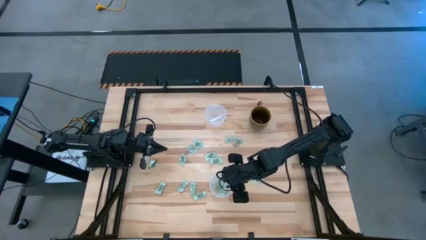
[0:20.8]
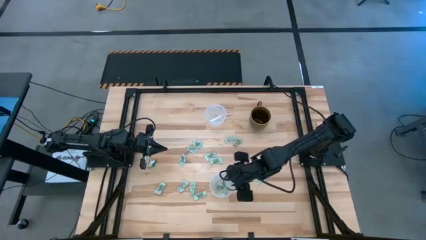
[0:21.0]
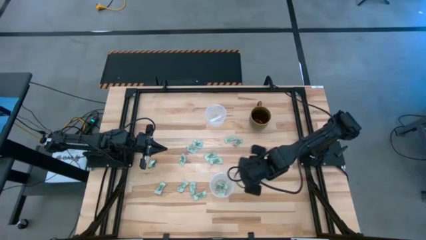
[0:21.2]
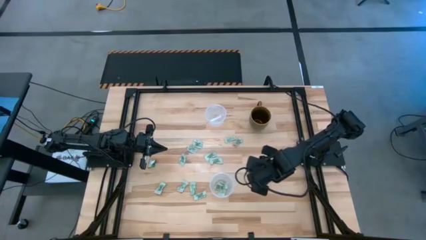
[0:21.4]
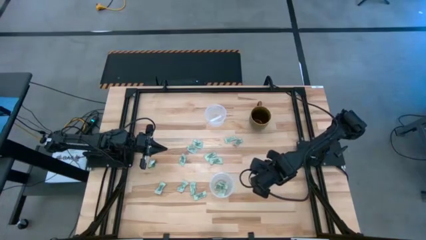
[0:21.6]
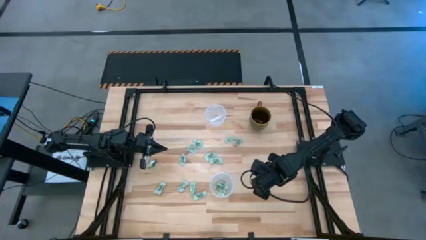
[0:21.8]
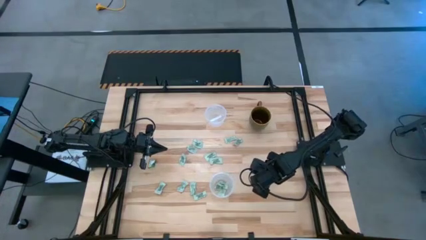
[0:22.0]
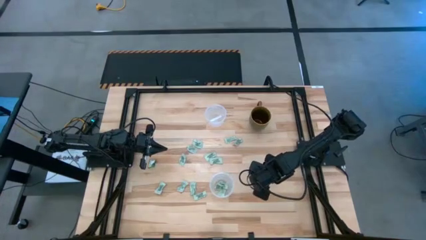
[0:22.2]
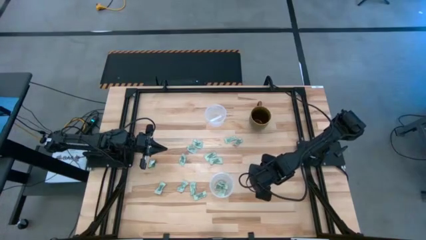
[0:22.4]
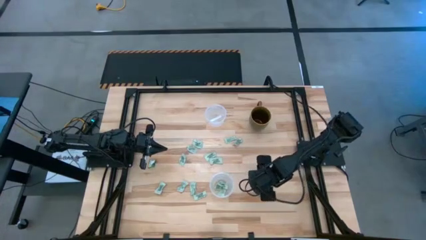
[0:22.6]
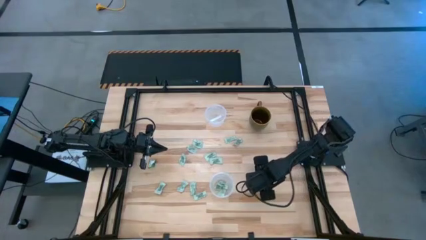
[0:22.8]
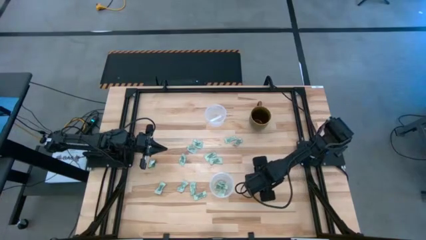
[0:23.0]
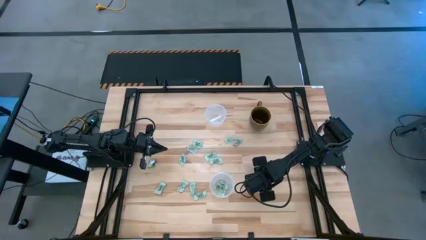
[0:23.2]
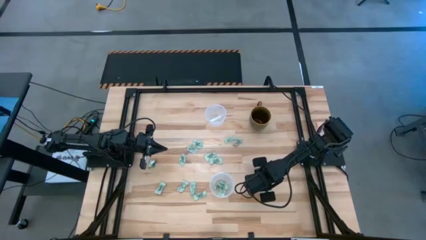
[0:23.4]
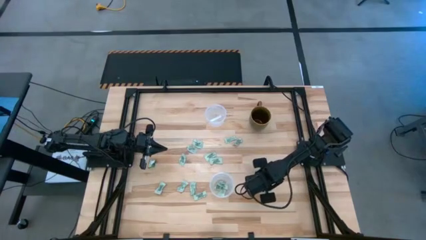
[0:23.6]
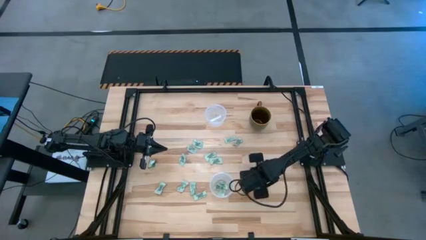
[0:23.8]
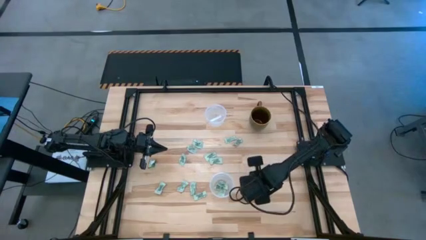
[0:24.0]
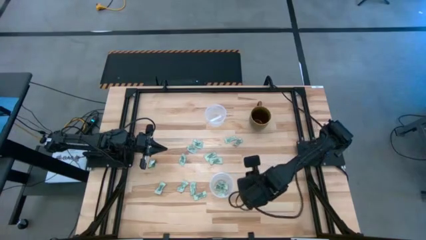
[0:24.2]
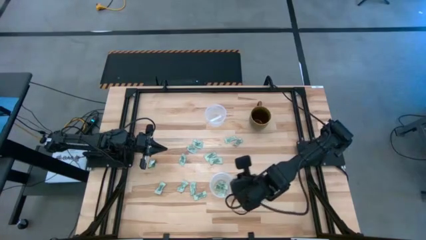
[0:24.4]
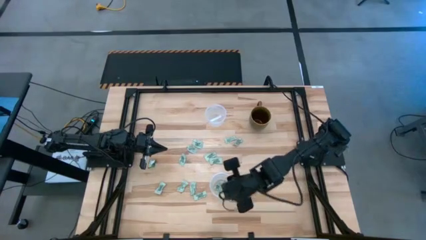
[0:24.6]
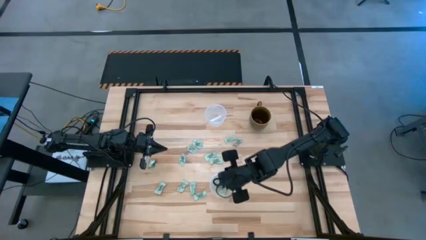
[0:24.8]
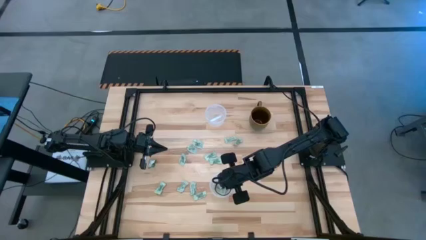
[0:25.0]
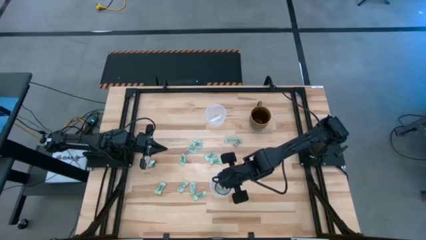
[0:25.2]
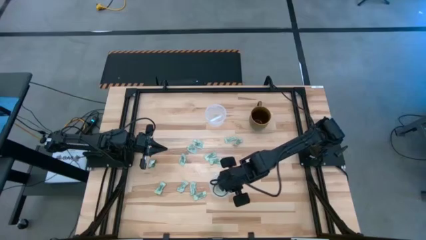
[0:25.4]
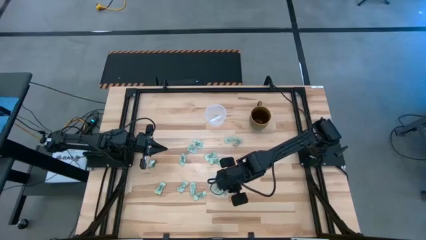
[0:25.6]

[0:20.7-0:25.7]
Task: Pick and place Stevia / Truvia into bins
Put the stevia packet into the bottom transparent container

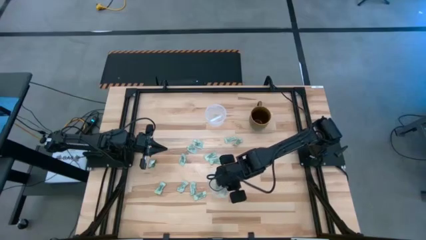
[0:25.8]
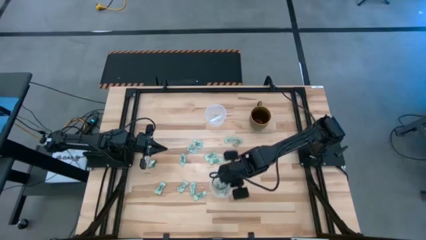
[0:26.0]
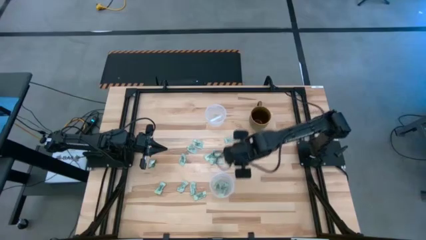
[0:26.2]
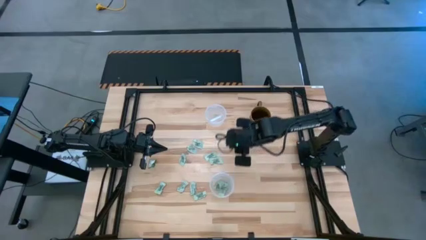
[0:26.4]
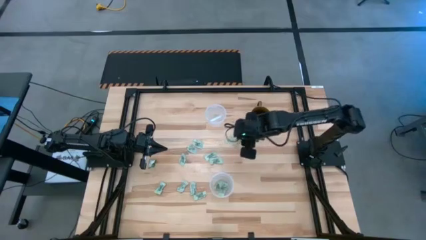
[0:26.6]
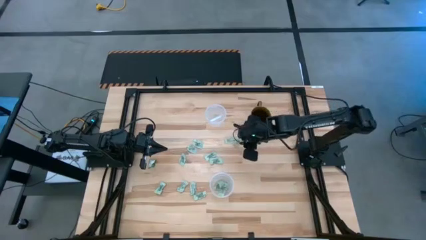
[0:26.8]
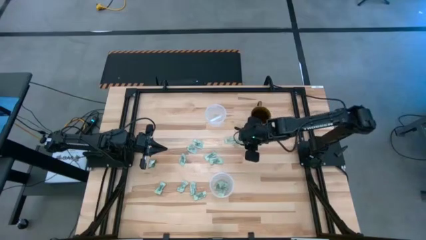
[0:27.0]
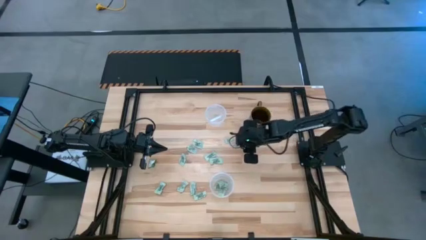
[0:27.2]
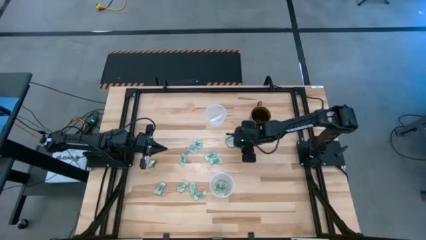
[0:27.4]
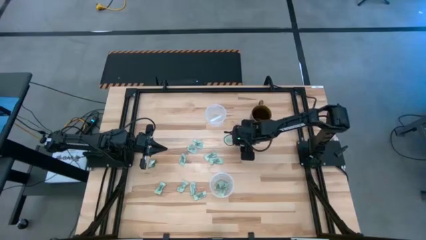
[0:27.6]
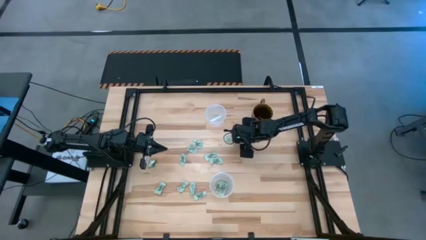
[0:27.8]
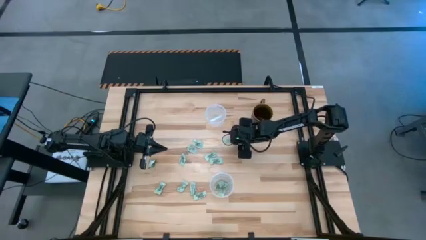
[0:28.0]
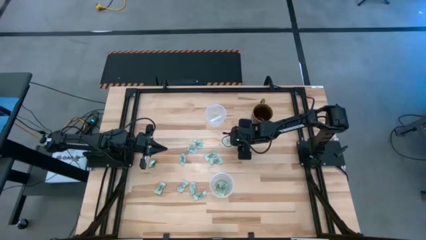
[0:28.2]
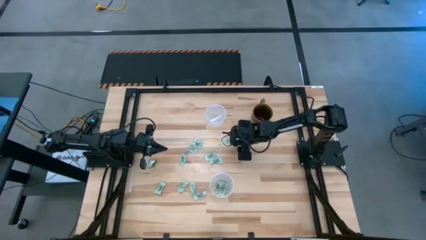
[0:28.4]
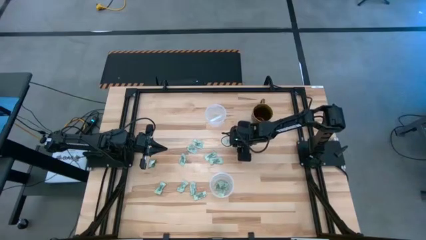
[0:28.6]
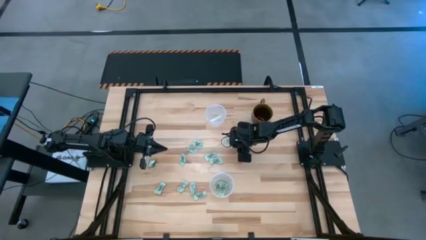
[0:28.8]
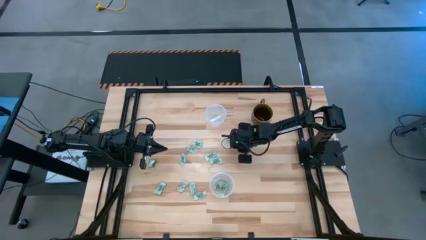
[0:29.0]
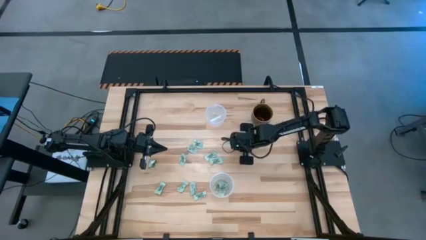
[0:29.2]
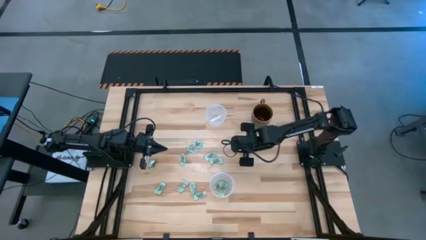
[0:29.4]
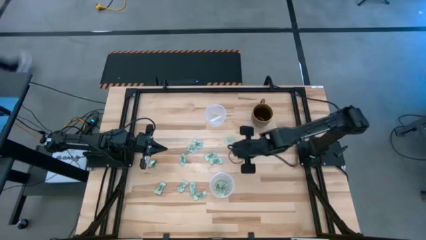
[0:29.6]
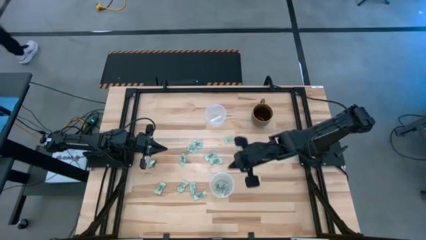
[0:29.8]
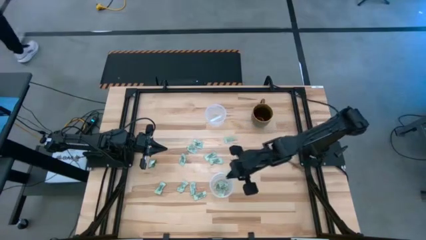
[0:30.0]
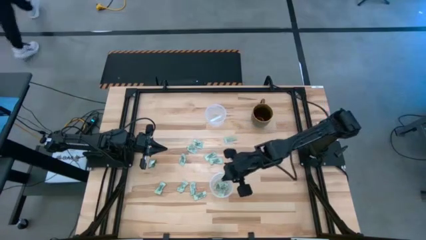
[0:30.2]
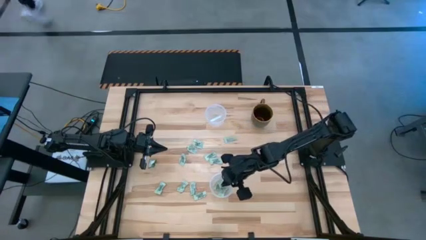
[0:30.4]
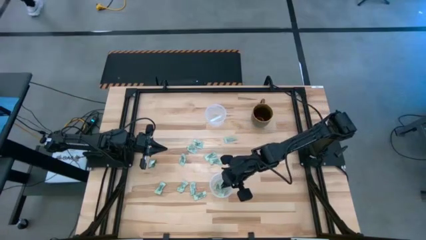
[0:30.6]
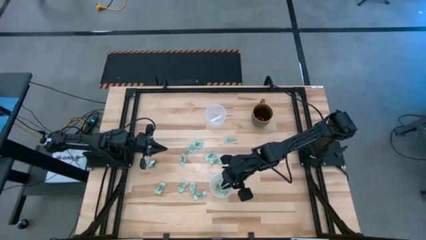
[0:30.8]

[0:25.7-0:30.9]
Put the stevia packet into the bottom transparent container

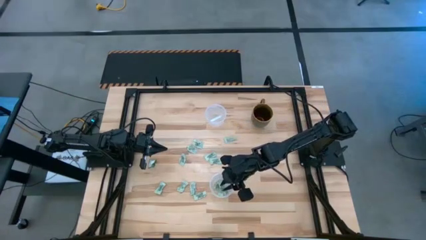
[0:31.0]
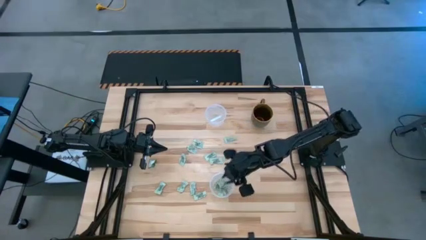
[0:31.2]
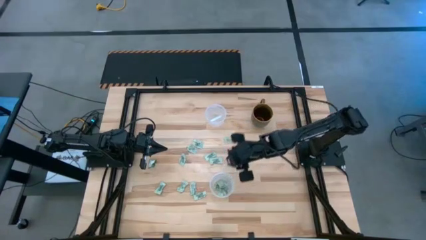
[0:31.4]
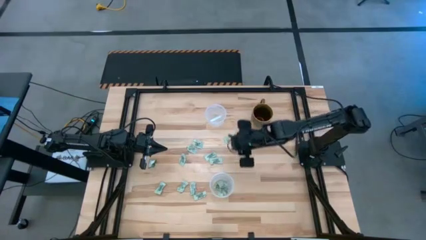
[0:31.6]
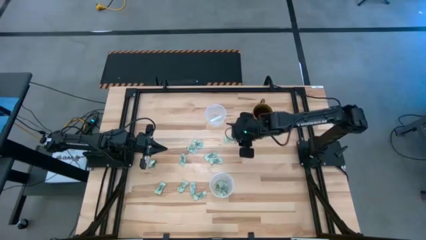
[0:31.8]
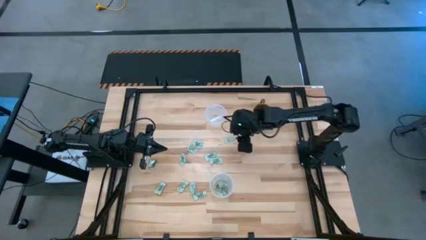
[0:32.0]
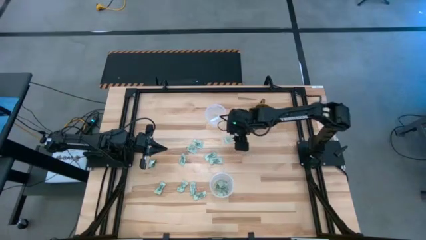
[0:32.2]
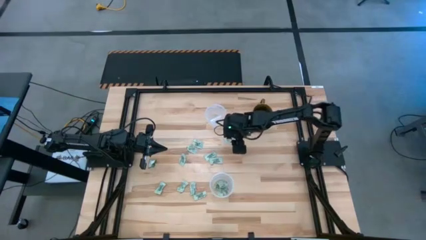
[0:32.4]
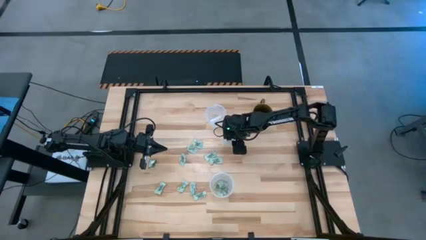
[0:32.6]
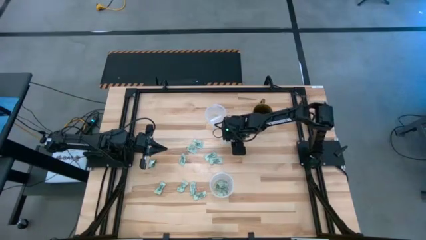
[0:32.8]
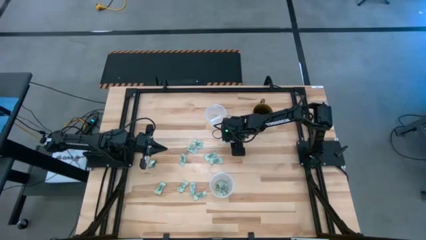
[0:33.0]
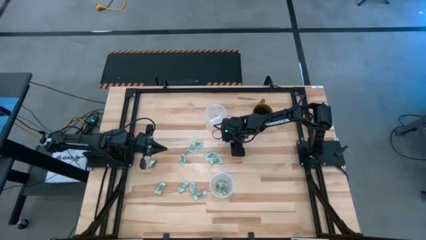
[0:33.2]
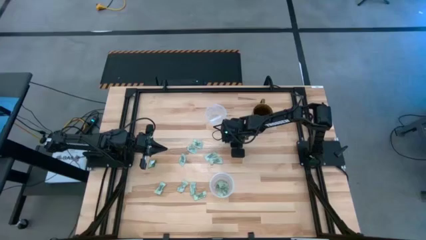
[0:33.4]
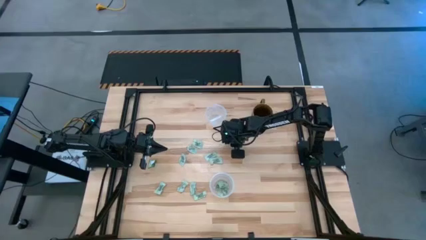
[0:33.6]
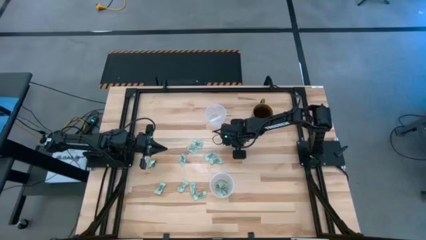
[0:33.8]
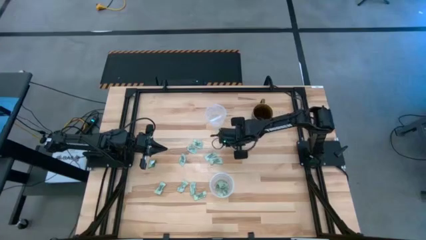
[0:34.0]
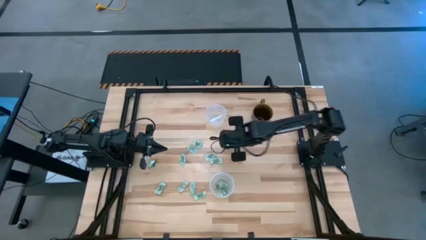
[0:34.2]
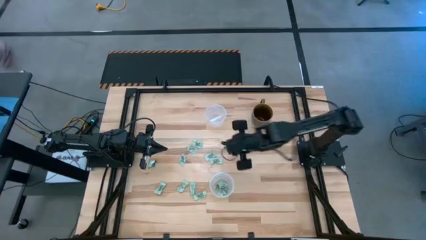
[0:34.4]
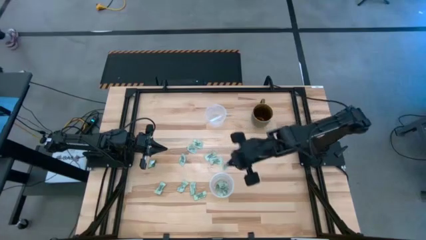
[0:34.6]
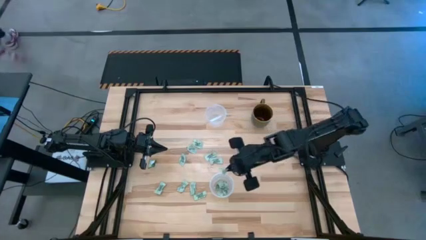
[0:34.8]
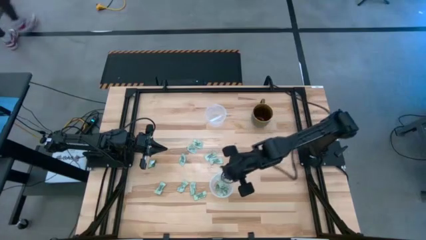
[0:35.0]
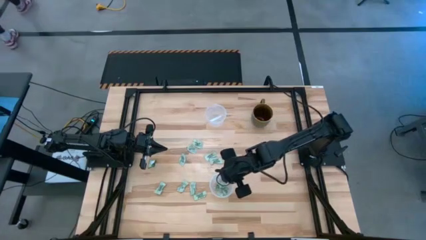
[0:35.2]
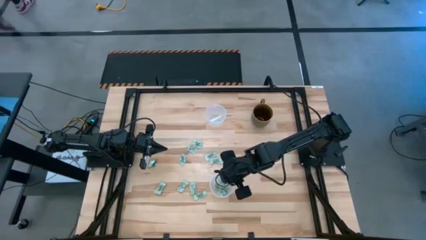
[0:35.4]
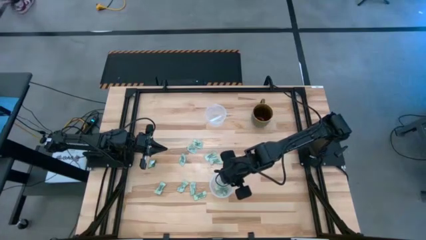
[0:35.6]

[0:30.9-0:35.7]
Put the stevia packet into the bottom transparent container

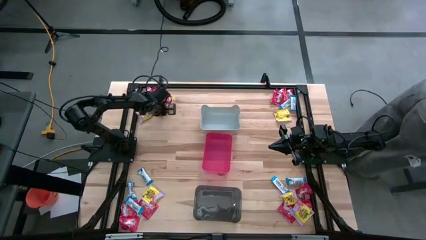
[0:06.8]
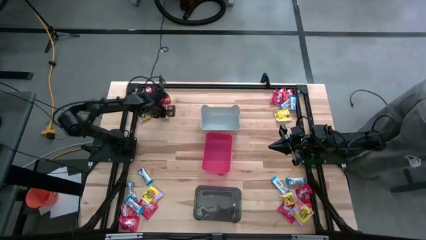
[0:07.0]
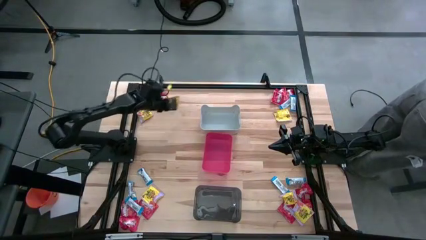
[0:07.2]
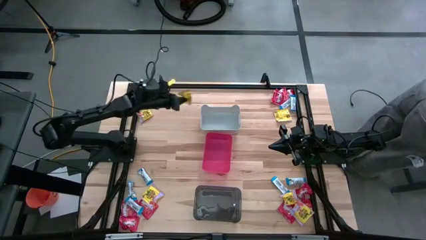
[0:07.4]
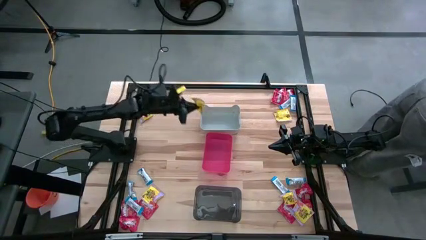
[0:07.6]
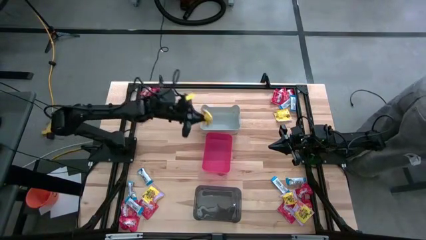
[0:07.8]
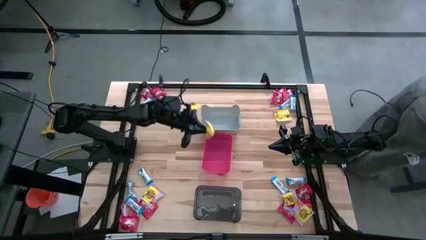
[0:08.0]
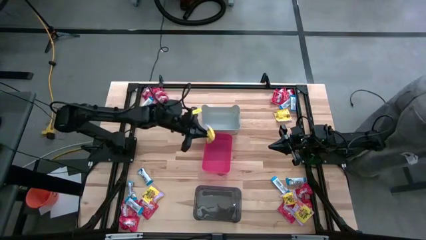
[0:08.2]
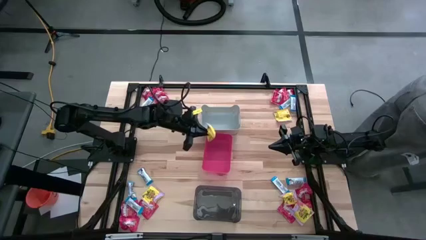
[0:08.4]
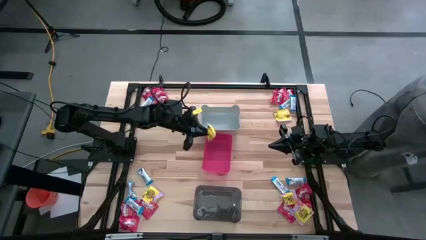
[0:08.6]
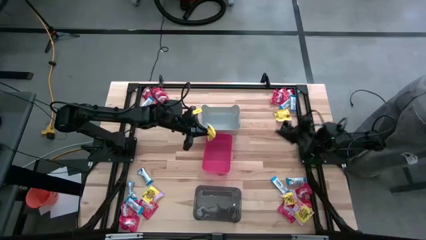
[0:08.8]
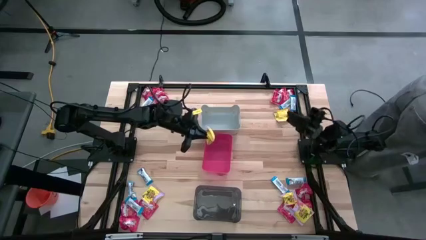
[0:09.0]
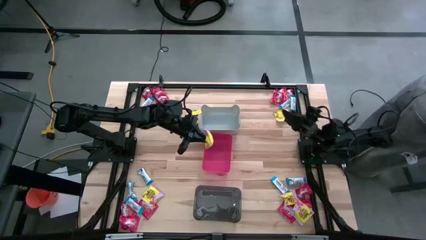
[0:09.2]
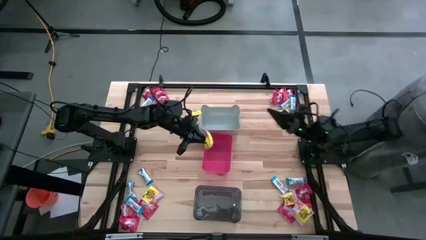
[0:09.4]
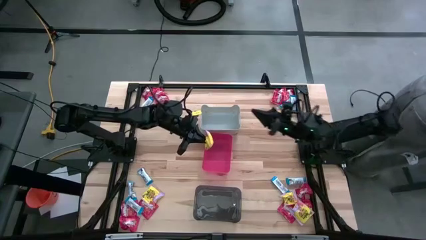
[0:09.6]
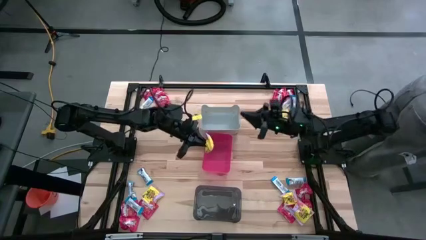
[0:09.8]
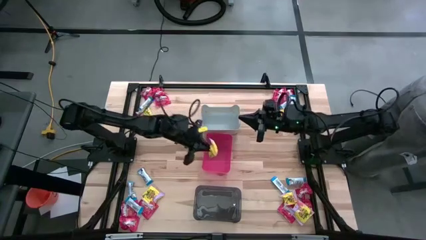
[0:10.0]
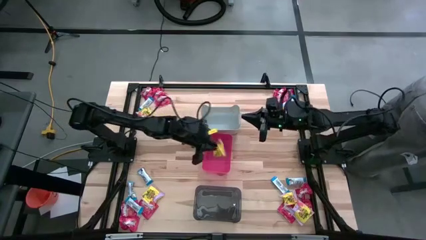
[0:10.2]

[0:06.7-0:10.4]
Task: Sort candy
Put the yellow candy into the red bin
